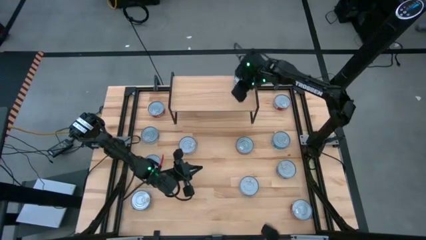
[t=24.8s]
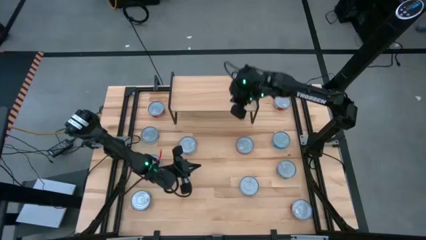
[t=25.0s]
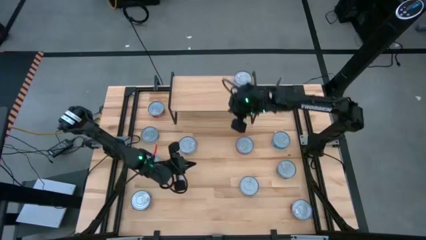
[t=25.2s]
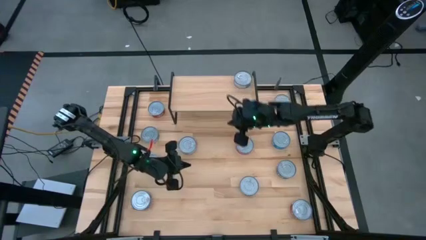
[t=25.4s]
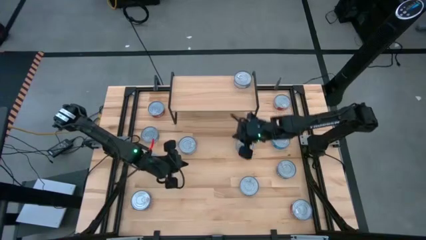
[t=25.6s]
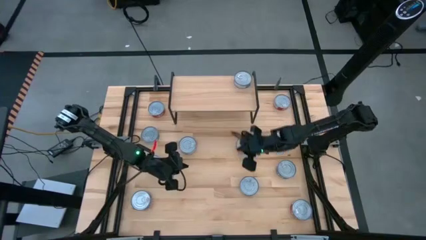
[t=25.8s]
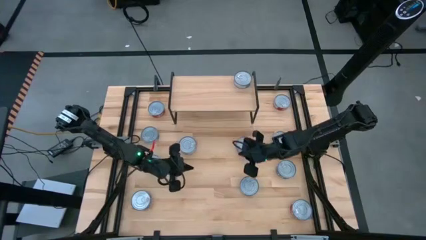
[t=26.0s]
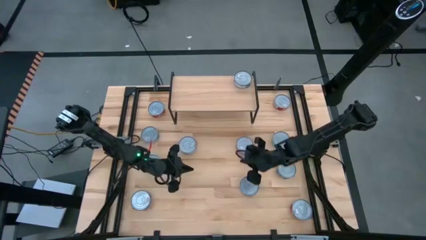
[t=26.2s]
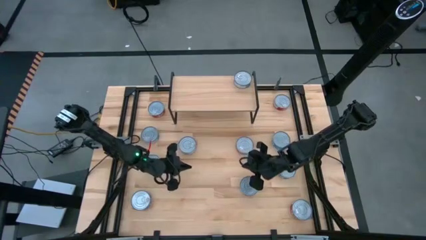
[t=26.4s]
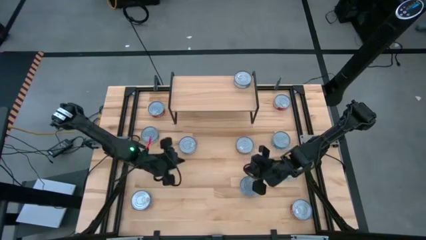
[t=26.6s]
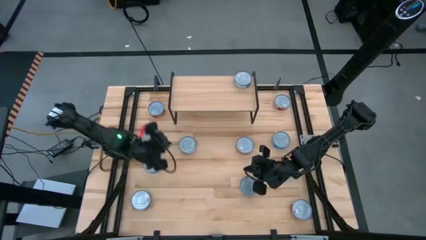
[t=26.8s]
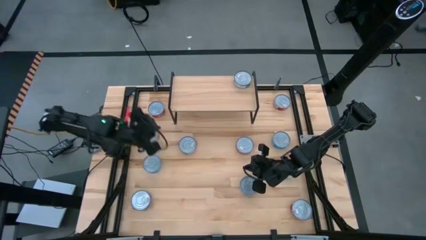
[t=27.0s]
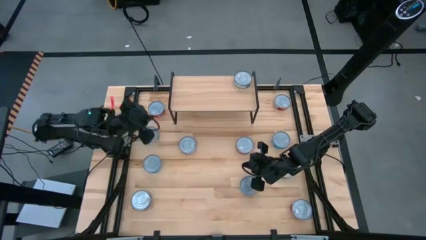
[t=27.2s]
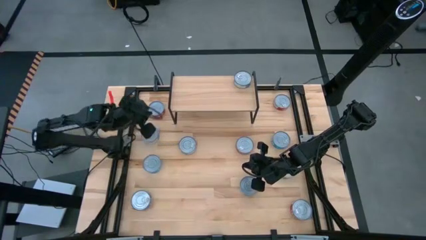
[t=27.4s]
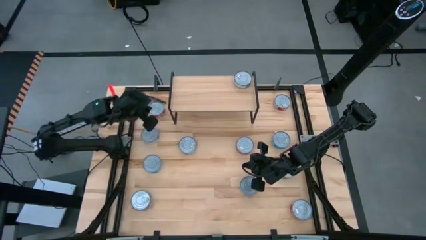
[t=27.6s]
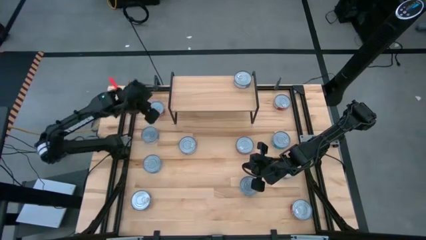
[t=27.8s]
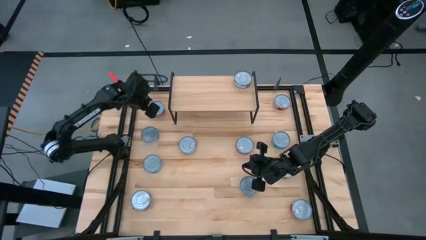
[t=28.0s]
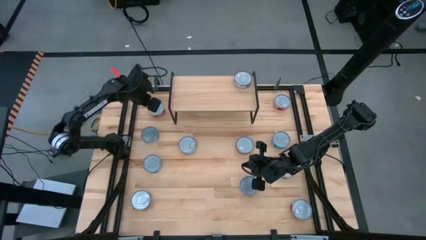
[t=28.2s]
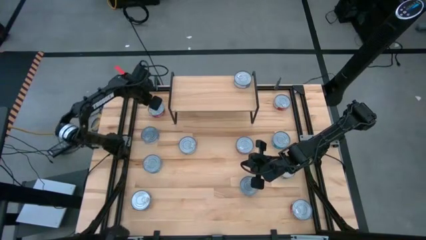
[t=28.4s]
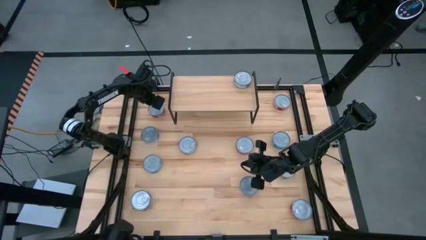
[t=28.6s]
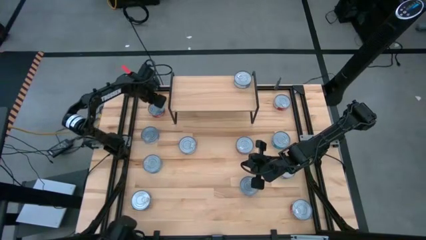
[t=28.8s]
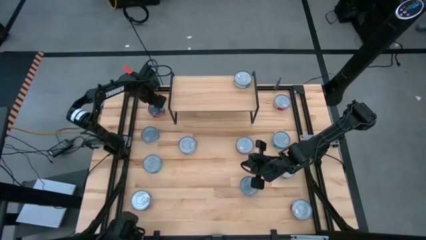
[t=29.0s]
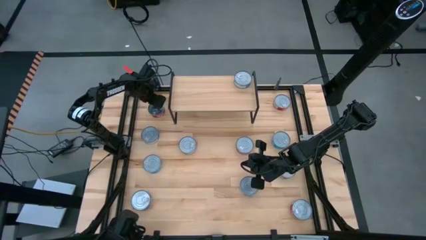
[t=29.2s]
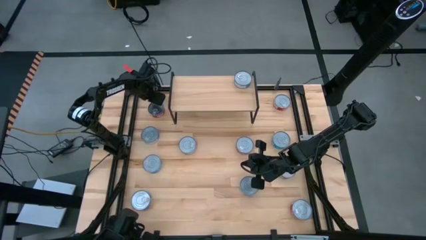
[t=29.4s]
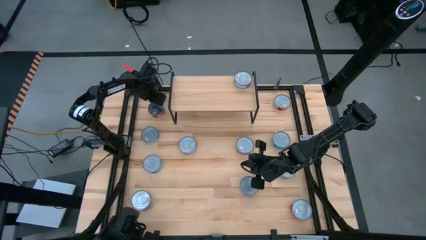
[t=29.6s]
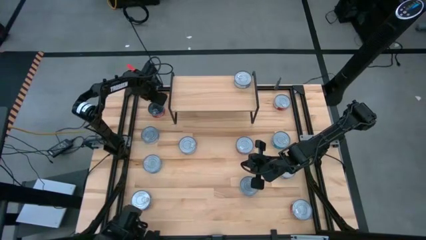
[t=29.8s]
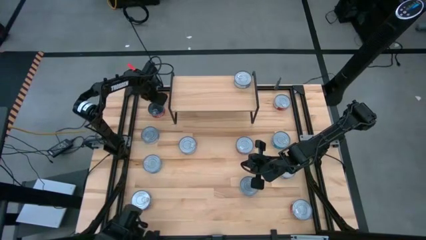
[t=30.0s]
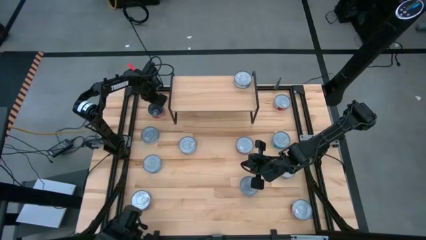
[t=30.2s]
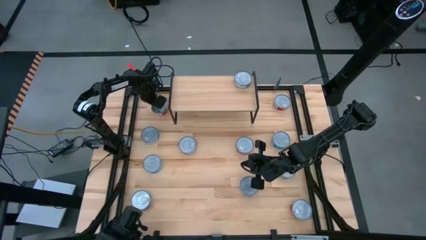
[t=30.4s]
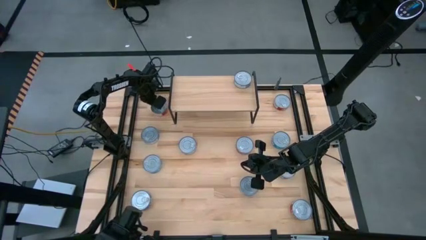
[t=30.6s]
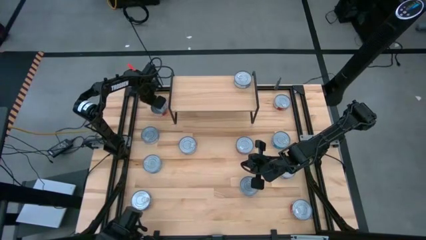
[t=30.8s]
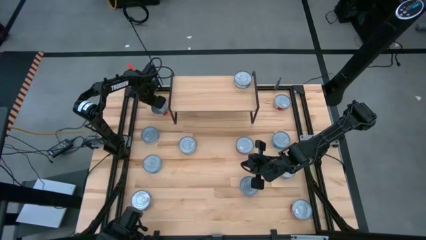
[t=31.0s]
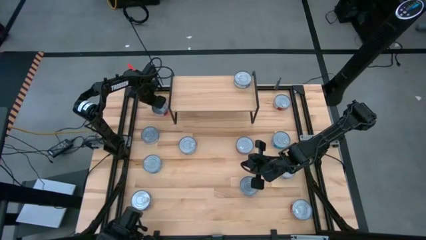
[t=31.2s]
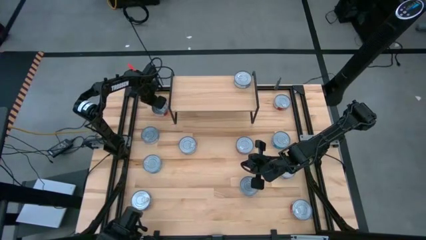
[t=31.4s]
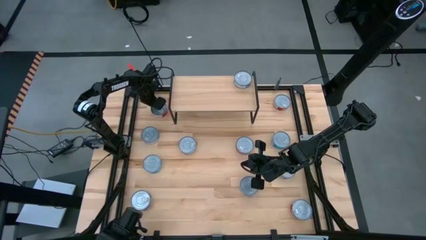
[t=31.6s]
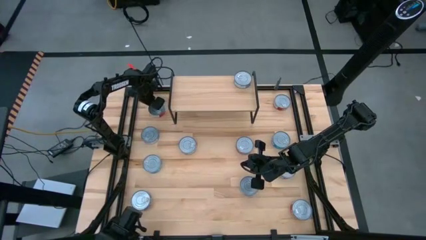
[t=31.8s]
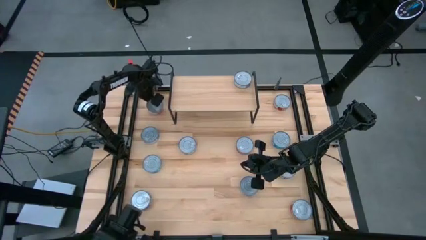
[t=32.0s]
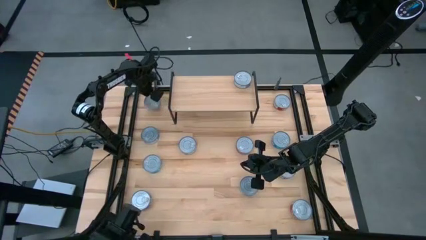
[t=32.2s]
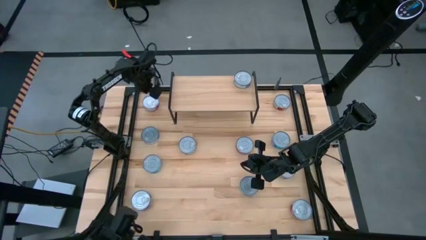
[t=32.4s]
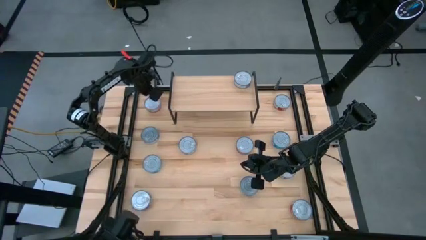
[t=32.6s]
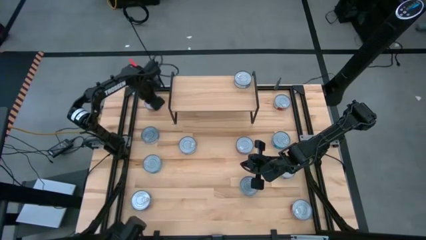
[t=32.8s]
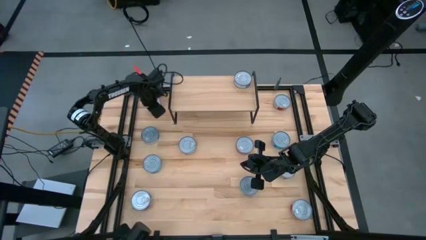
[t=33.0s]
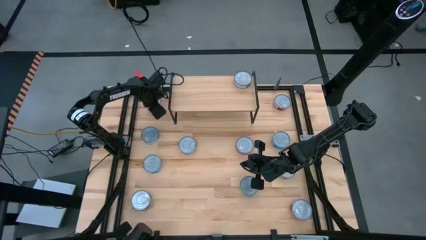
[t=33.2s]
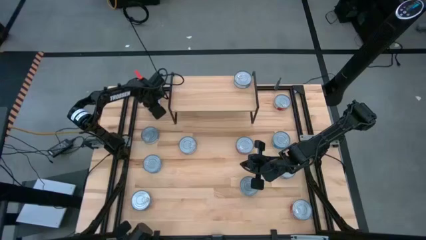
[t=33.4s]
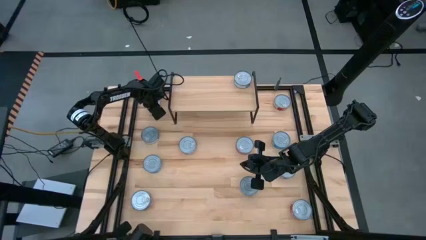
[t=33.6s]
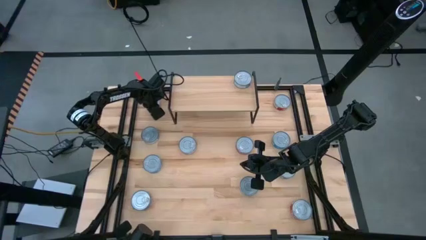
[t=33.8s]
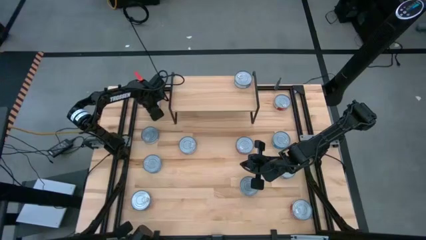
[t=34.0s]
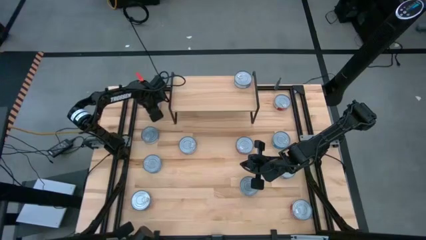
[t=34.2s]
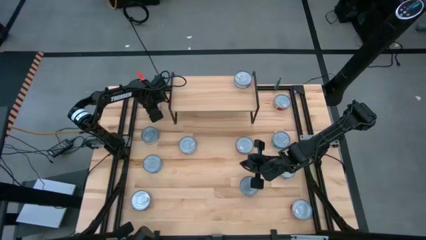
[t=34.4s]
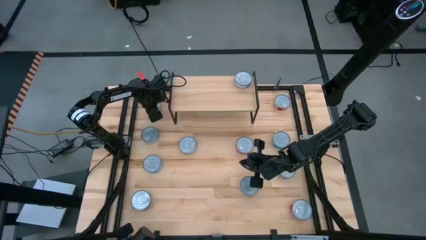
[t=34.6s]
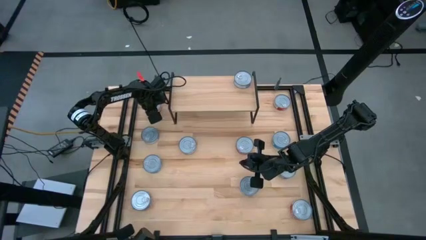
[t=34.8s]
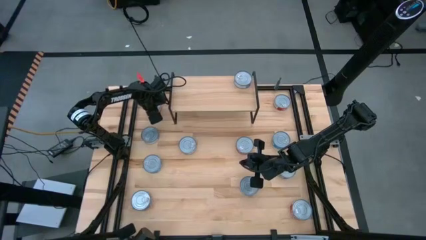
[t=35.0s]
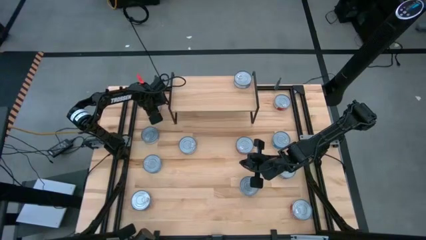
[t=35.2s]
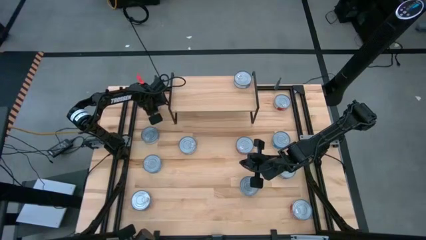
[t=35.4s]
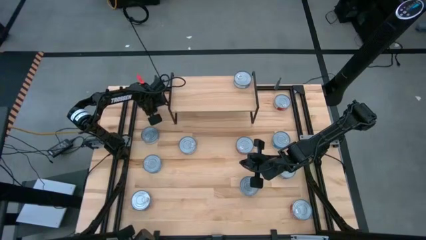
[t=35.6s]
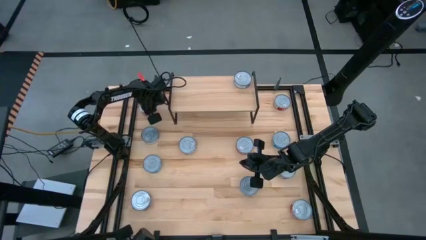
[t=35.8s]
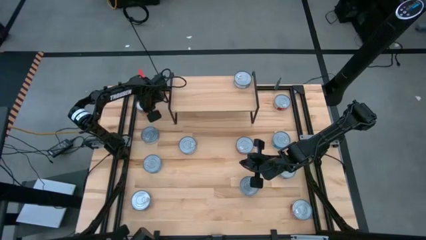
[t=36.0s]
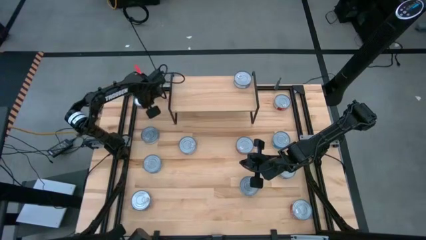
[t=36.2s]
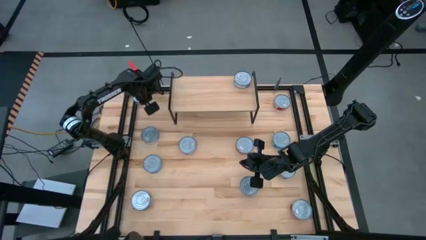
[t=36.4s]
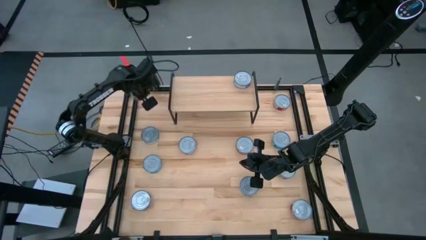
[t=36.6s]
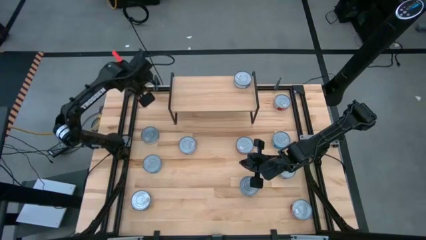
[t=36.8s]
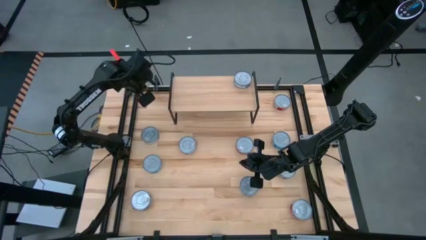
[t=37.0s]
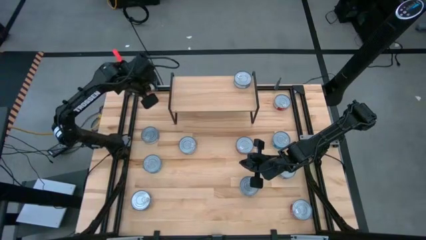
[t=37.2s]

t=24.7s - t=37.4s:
Task: Stack canned seafood by type on shelf
Put the red tuna can on the shelf

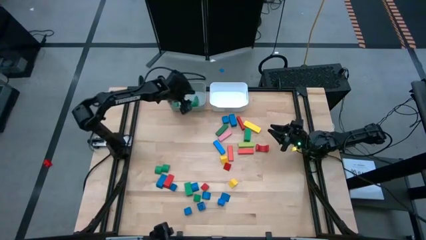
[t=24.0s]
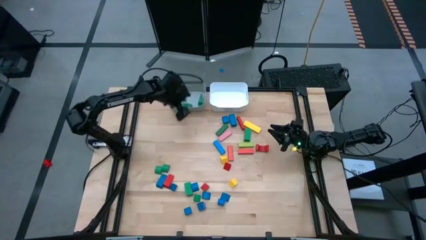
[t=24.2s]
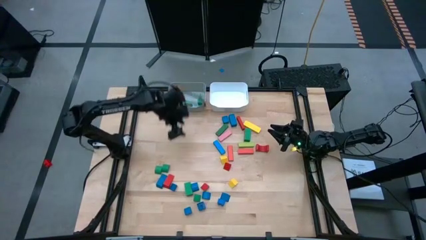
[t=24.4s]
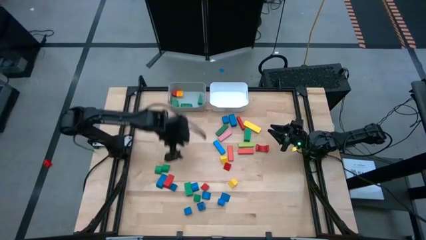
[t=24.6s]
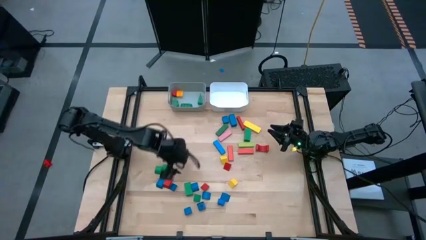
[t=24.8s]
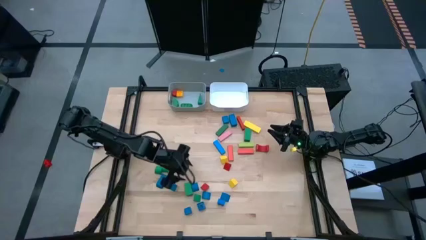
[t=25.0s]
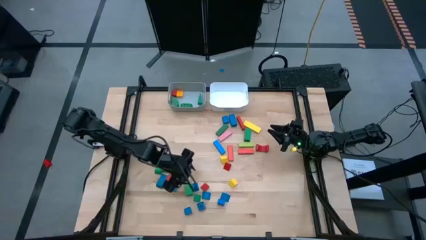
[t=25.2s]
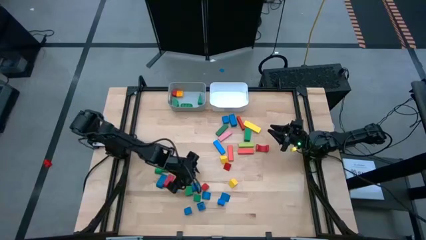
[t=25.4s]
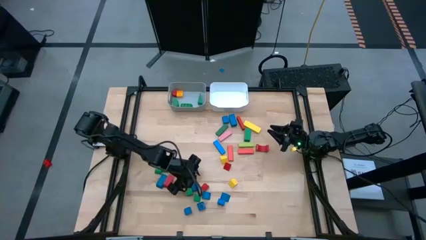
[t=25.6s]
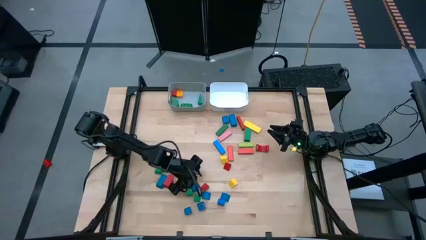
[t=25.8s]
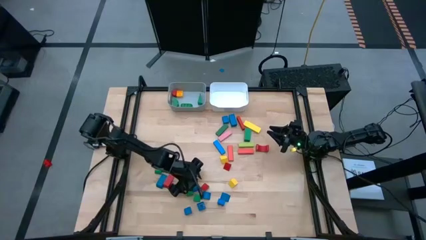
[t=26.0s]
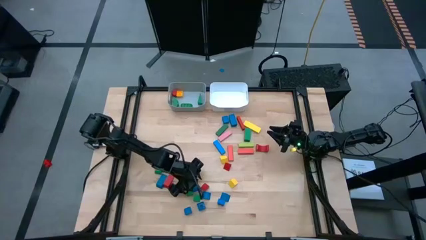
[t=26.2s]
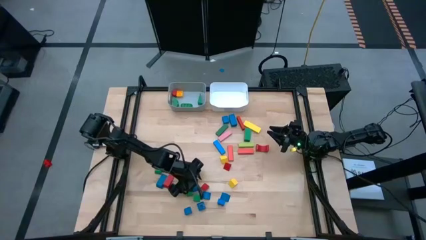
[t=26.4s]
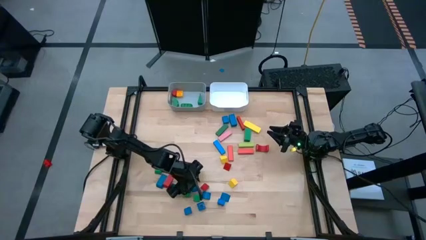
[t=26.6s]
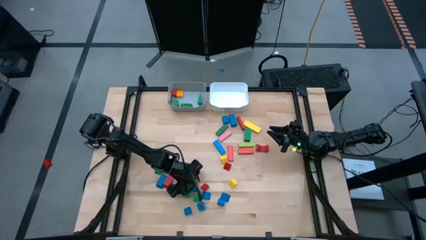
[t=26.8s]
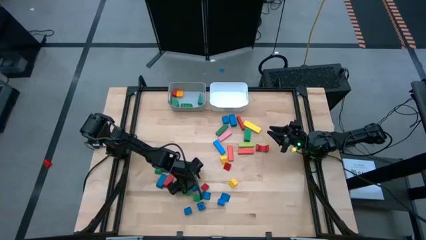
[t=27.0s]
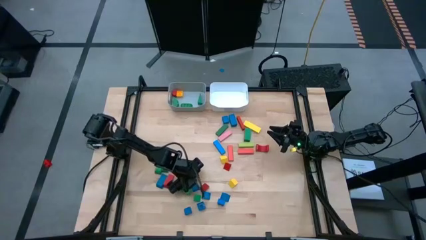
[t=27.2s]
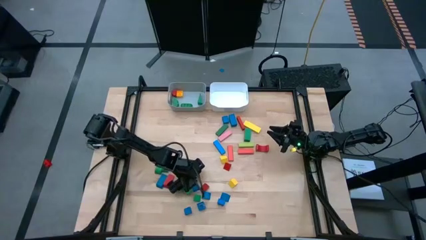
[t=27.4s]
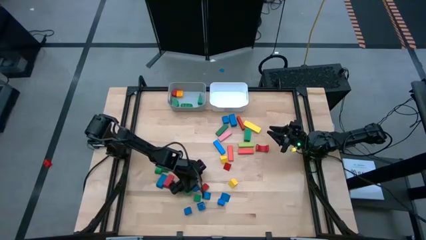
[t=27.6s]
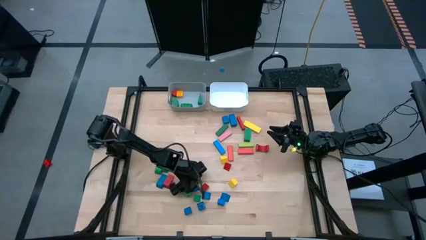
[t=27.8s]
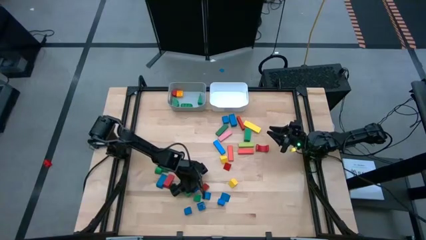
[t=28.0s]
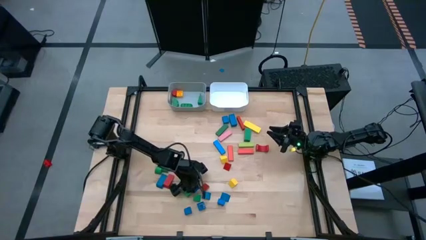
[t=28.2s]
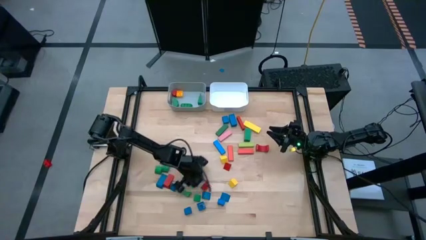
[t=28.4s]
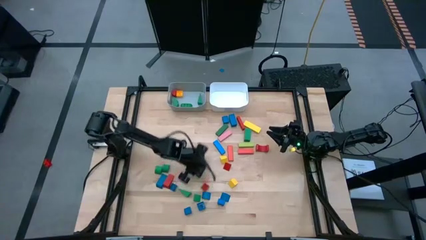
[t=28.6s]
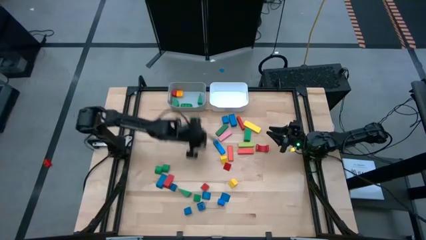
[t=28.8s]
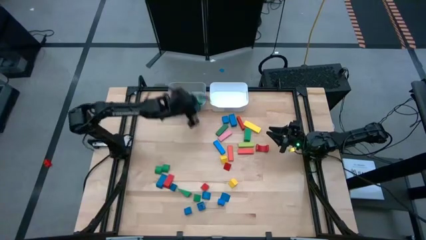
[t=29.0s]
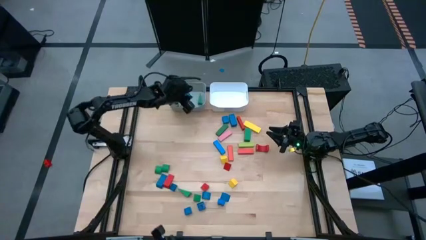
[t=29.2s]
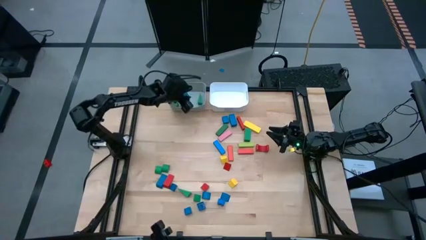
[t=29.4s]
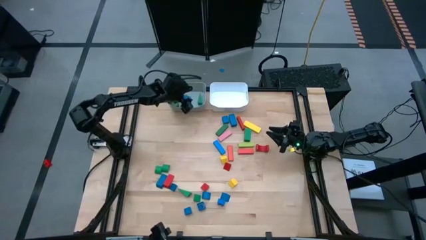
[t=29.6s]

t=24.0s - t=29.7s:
Task: Sort blocks by size
Put the blue half-circle block into the gray bin
